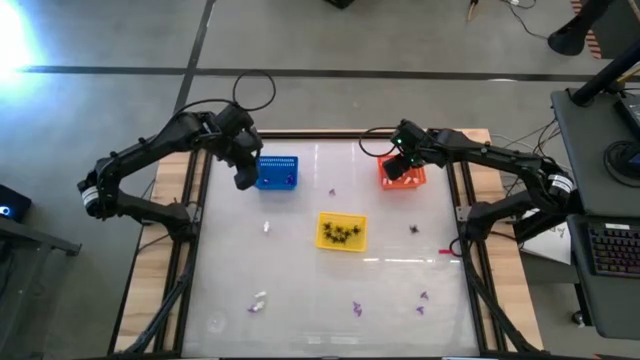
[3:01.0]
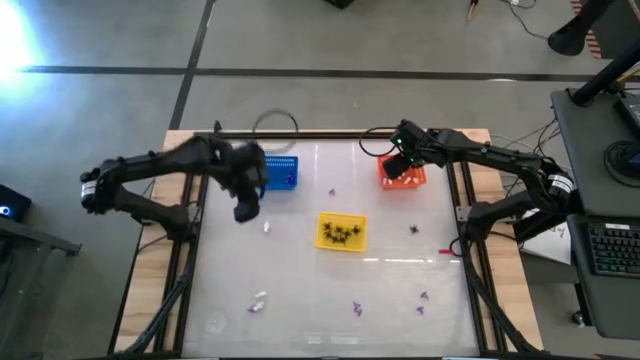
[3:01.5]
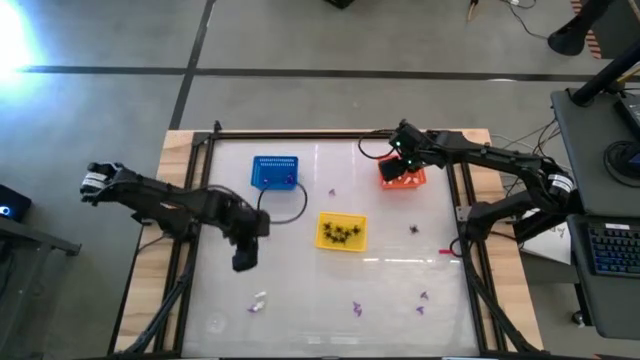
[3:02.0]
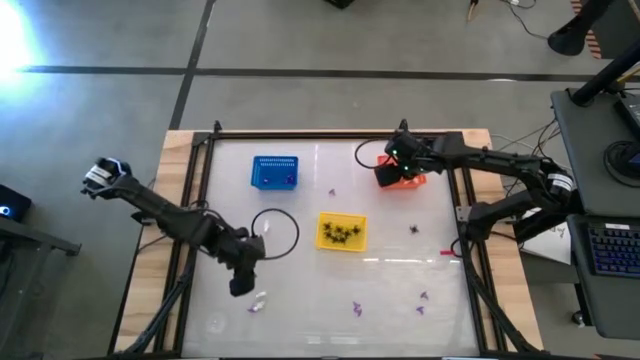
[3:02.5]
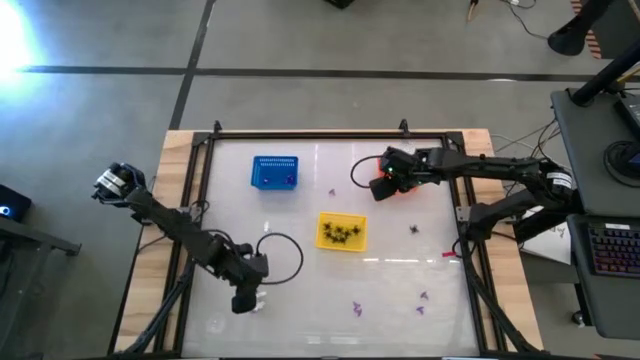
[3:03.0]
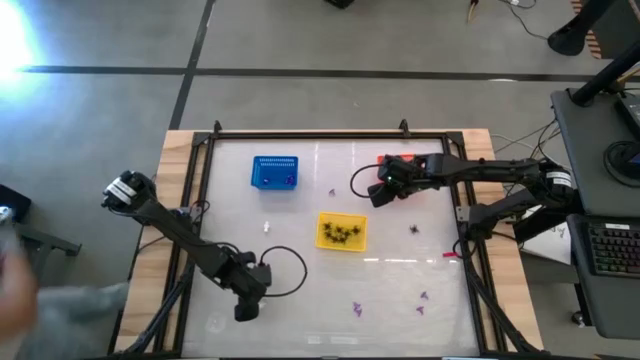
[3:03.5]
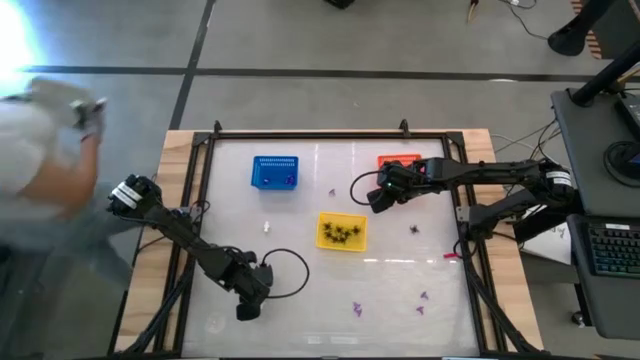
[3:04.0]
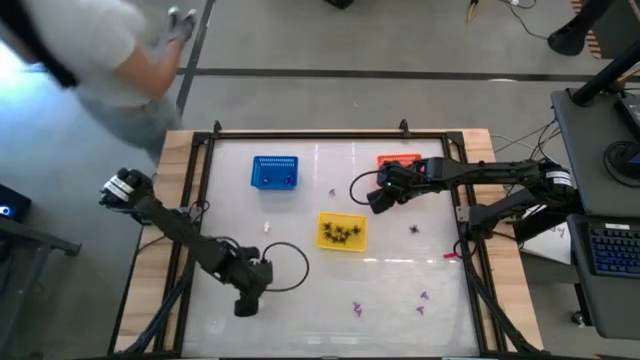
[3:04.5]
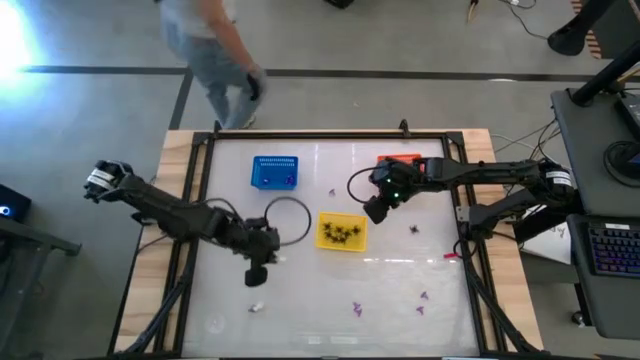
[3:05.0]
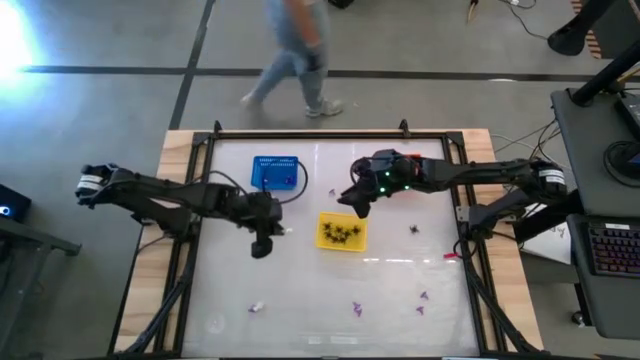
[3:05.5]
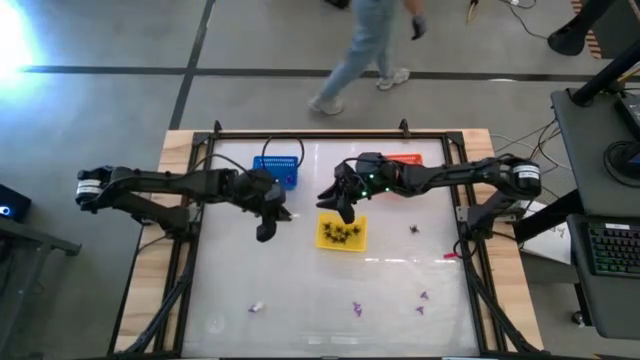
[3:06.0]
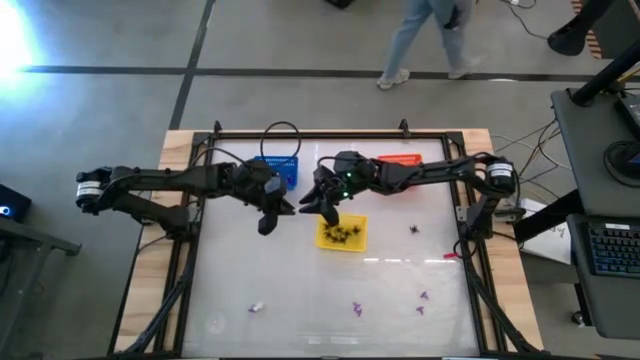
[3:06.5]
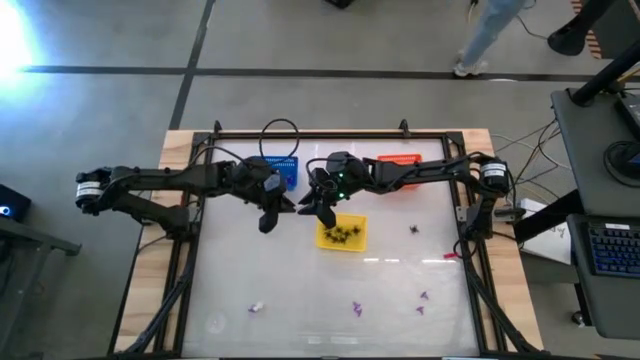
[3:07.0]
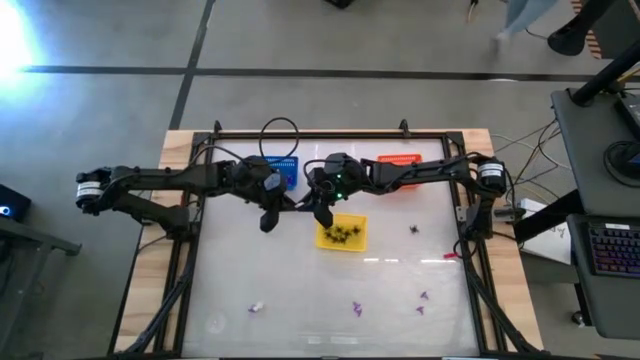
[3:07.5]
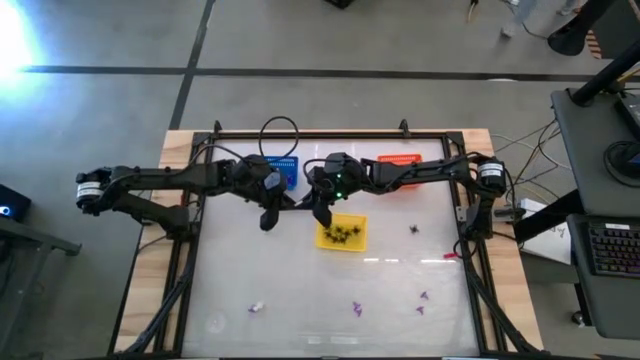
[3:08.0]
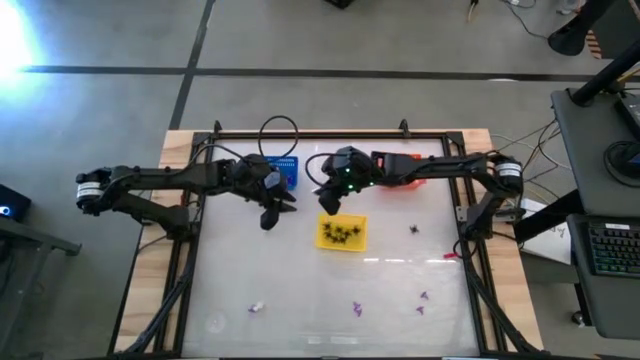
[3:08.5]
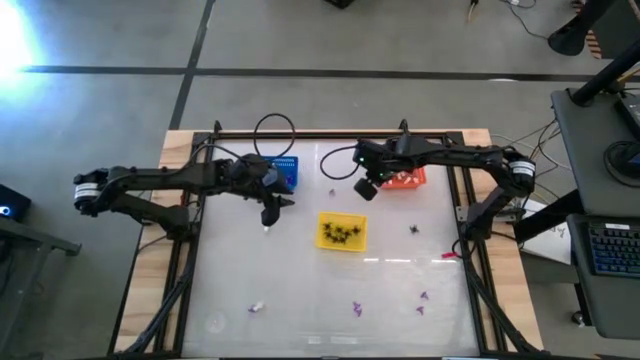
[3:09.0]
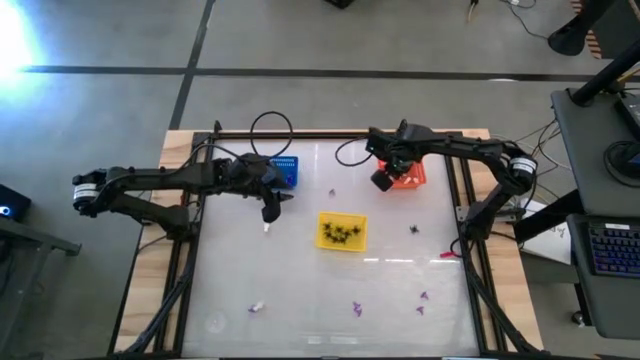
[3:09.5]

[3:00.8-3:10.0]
Task: Sort Halloween decoration
Put the white skeleton toy into the orange bin

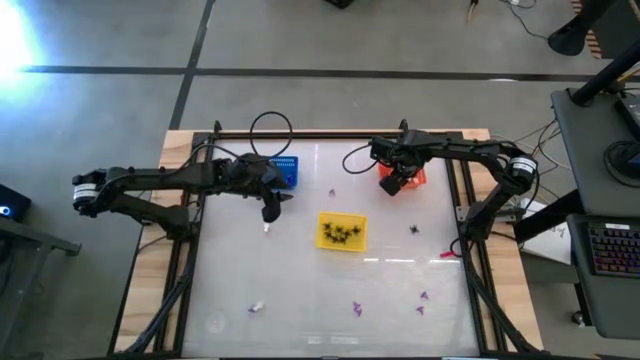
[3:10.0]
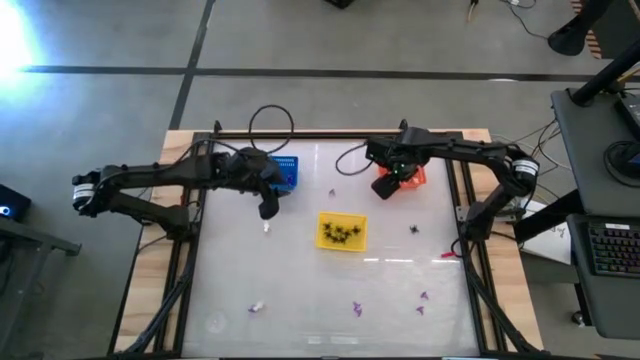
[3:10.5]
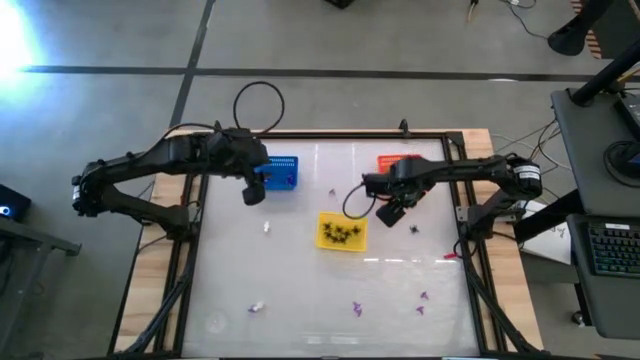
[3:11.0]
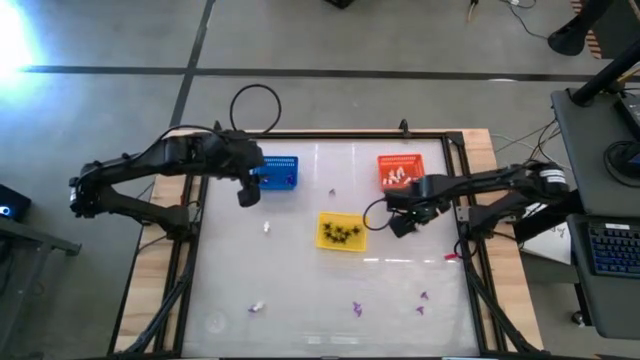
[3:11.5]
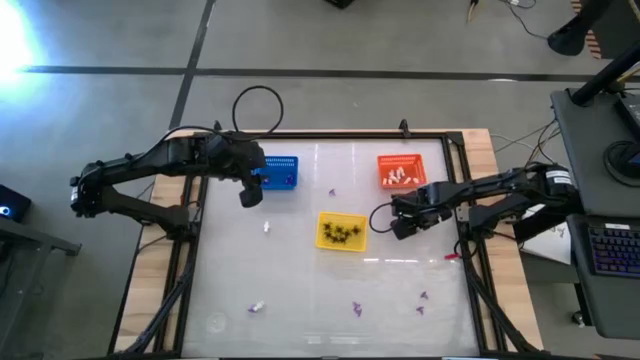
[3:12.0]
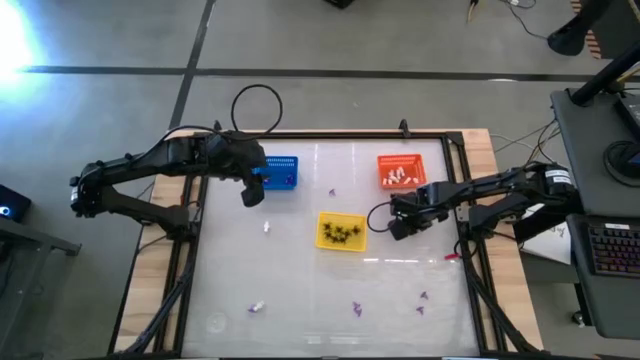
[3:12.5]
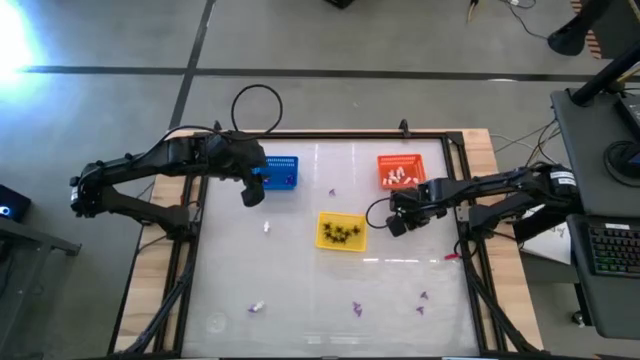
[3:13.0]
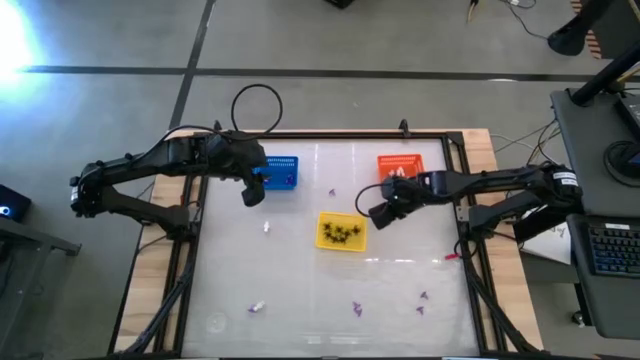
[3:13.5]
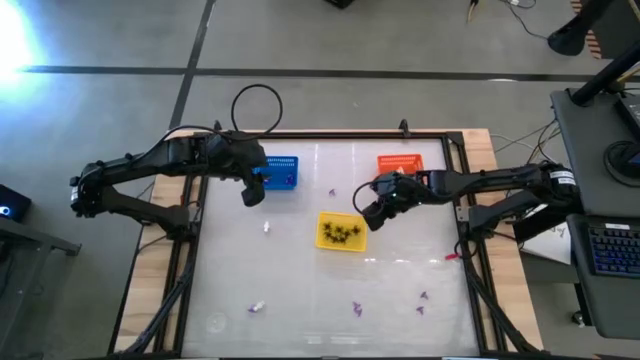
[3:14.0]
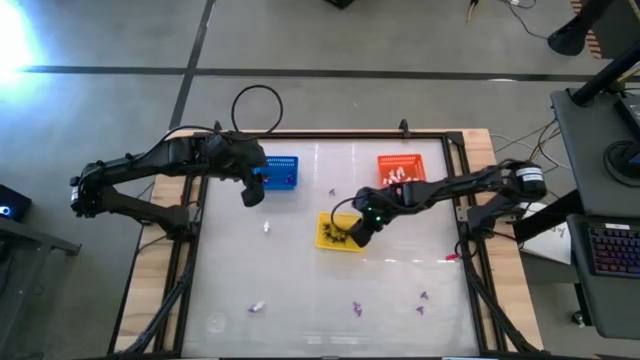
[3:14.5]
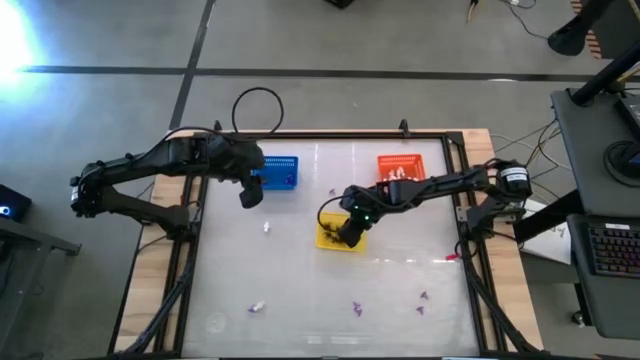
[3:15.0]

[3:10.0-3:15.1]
Put the black spider toy into the yellow bin

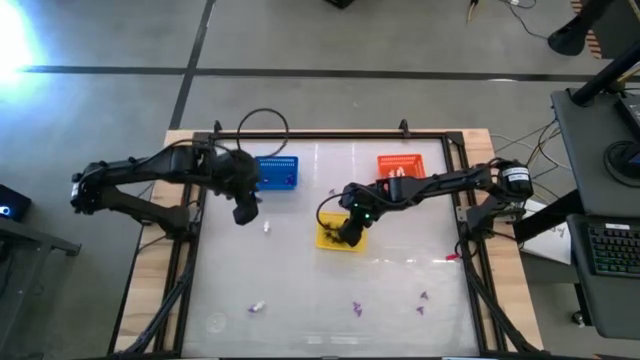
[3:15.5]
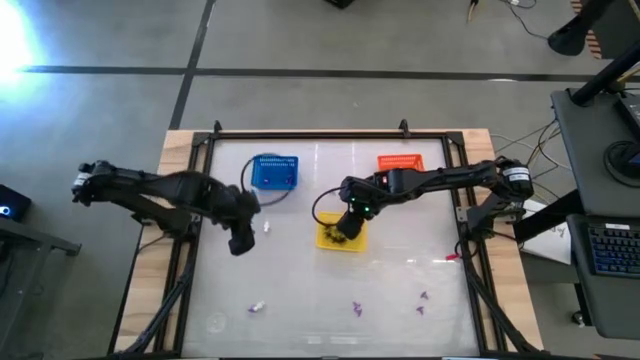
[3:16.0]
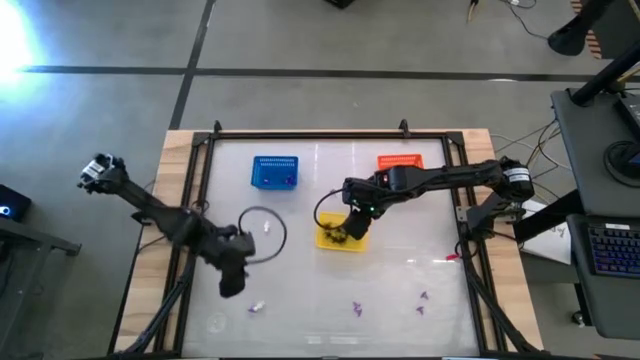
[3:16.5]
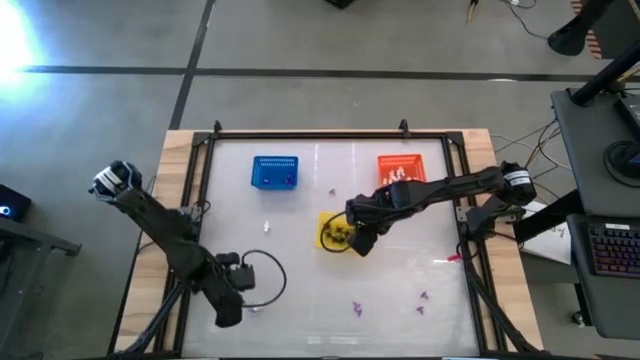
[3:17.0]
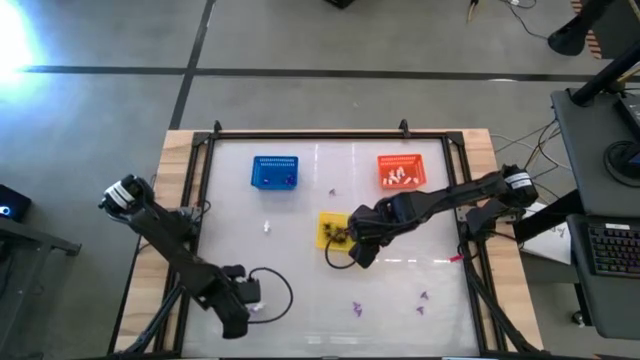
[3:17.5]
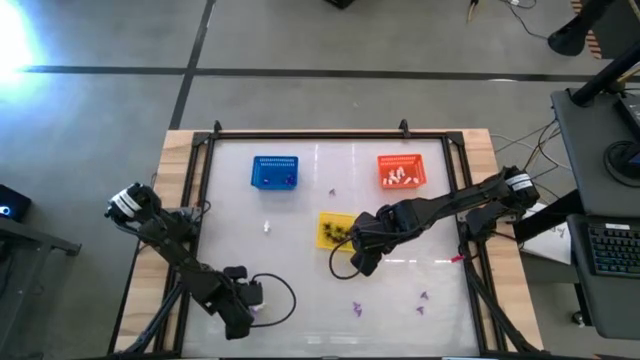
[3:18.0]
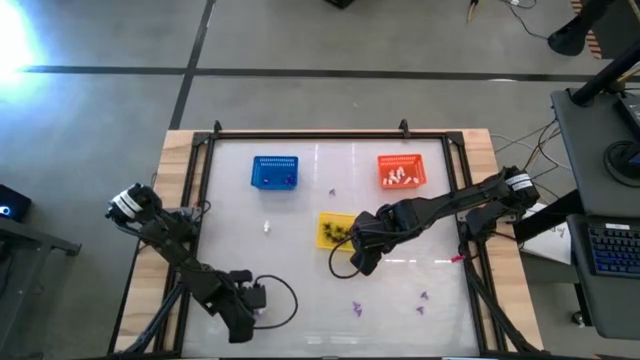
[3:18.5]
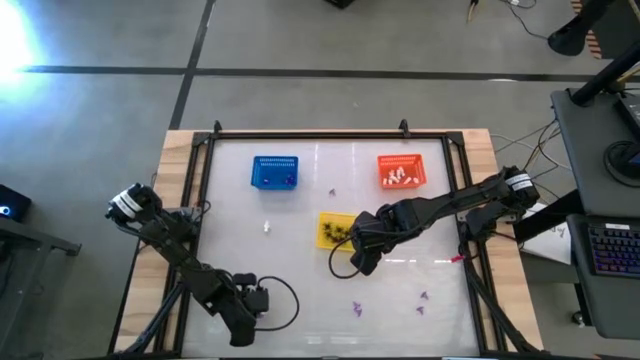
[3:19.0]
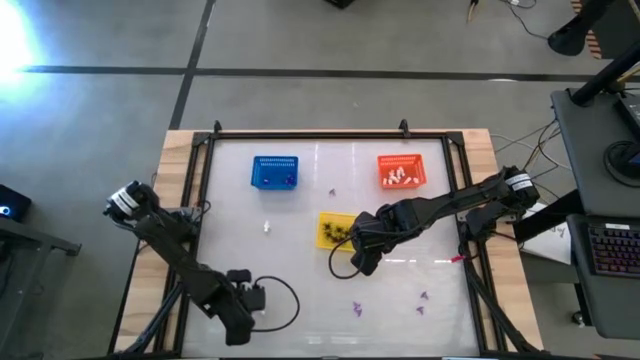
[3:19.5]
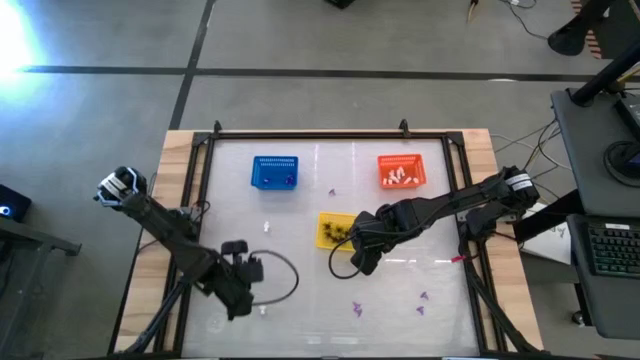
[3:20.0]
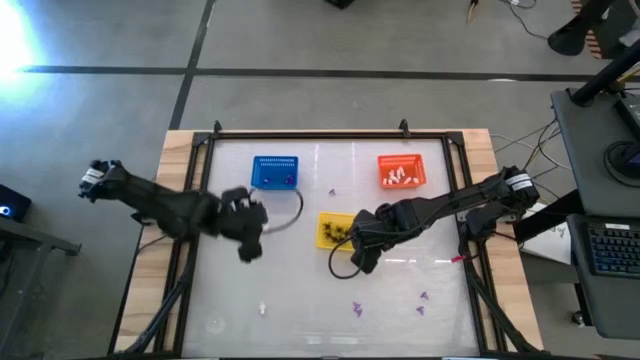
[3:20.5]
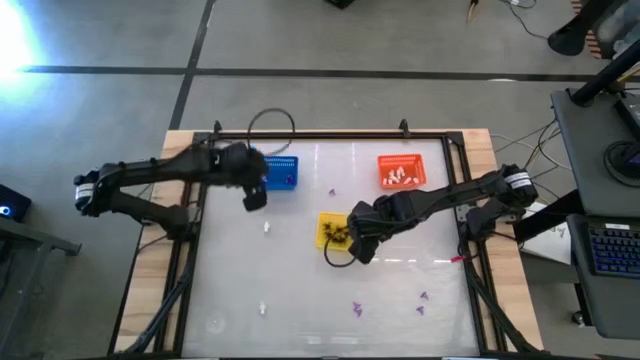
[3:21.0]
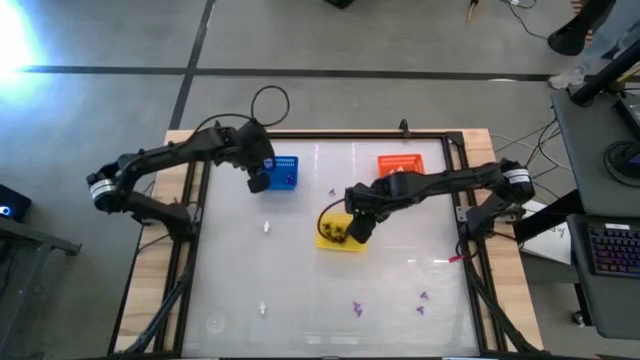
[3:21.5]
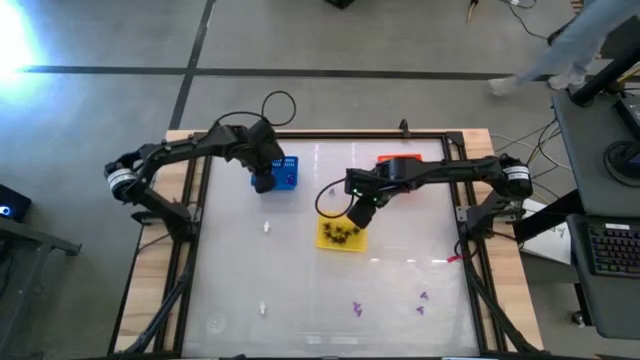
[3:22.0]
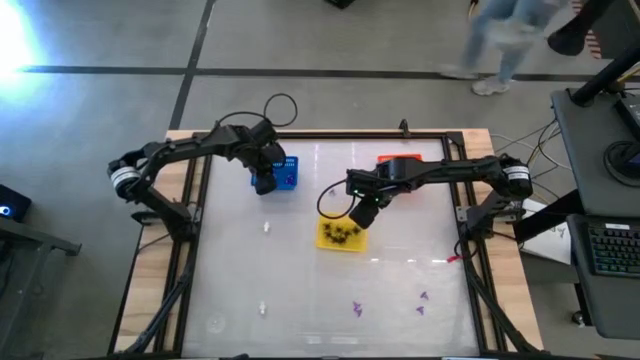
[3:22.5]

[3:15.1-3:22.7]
Put the purple witch hat toy into the blue bin
